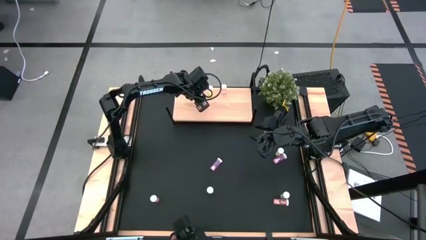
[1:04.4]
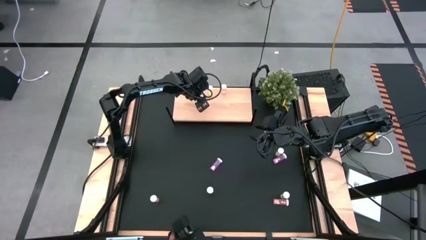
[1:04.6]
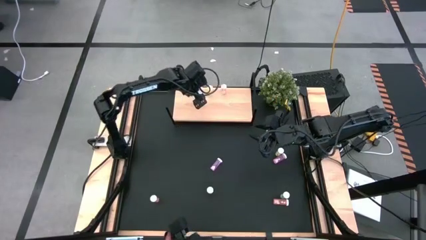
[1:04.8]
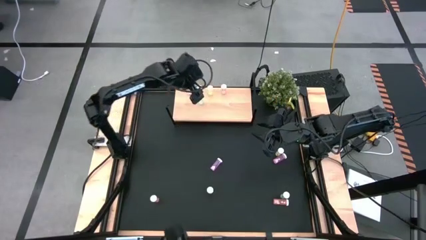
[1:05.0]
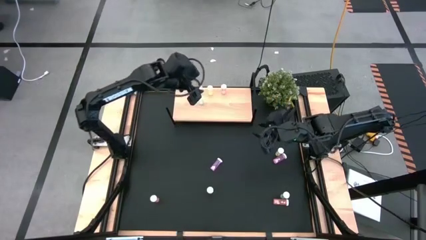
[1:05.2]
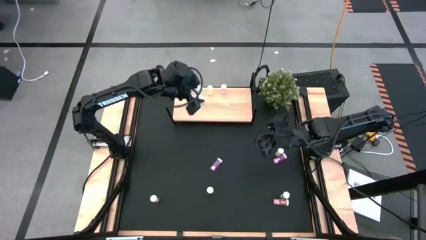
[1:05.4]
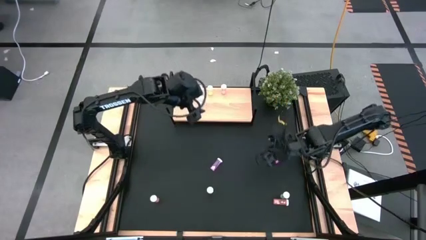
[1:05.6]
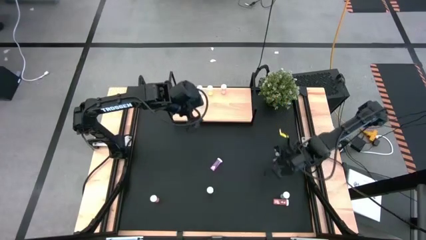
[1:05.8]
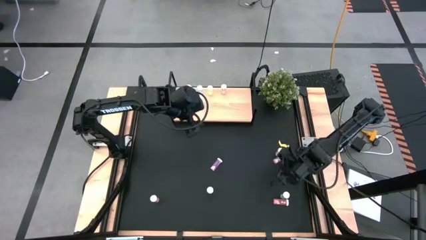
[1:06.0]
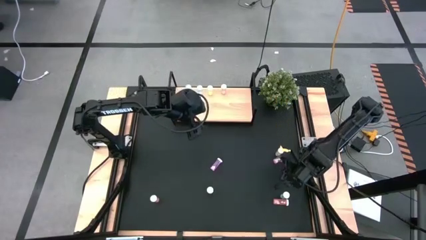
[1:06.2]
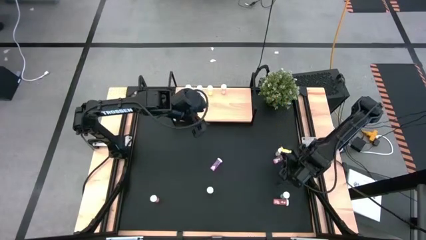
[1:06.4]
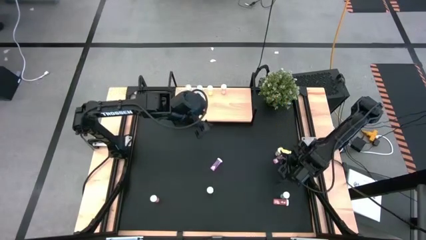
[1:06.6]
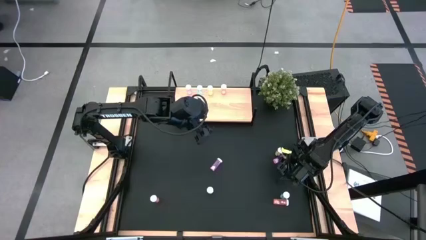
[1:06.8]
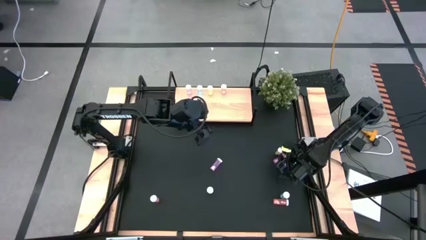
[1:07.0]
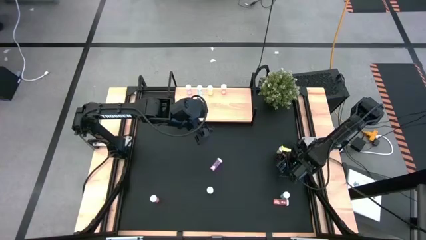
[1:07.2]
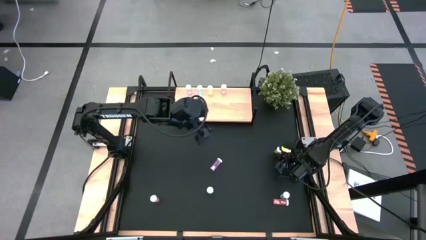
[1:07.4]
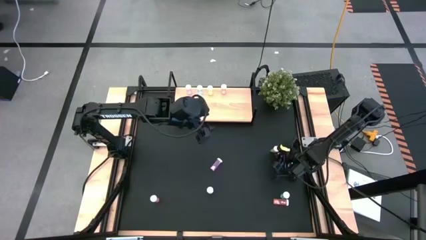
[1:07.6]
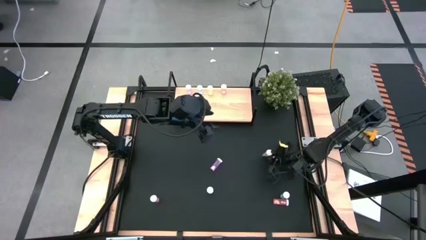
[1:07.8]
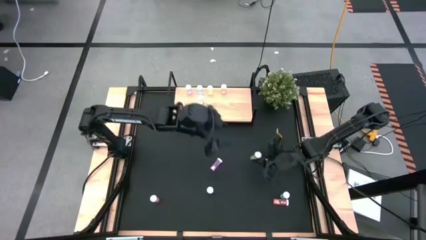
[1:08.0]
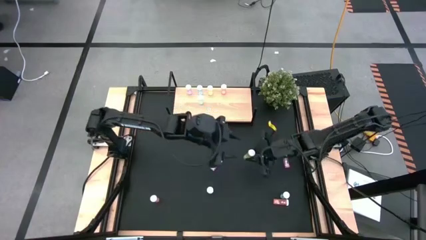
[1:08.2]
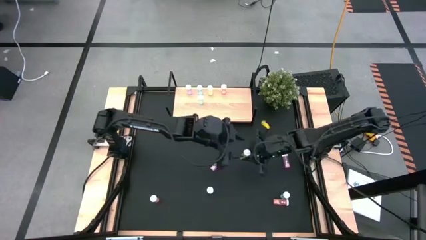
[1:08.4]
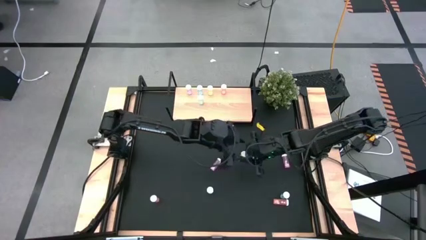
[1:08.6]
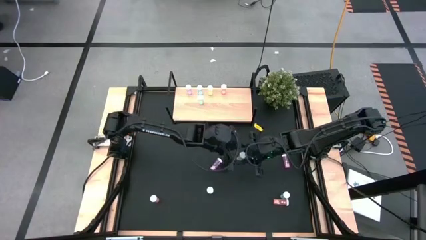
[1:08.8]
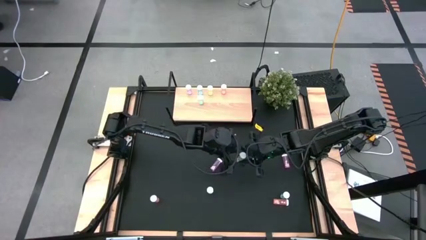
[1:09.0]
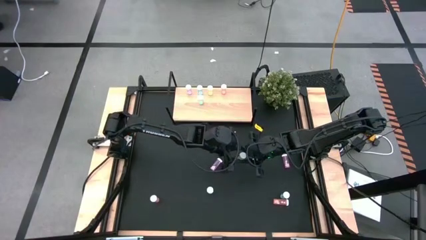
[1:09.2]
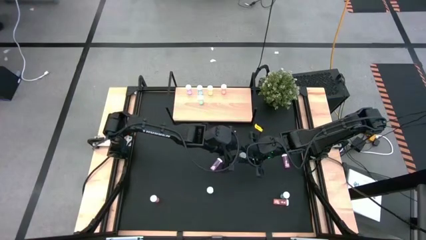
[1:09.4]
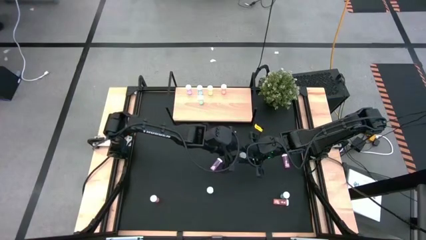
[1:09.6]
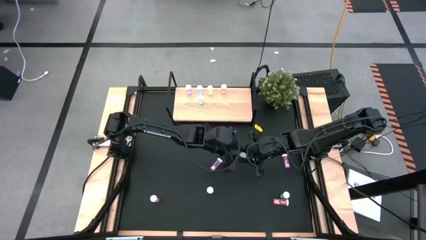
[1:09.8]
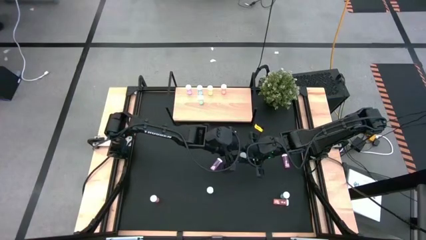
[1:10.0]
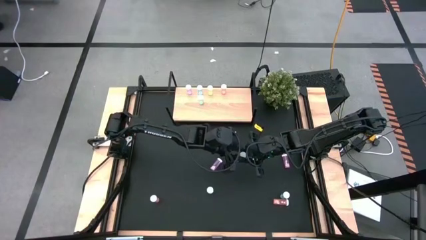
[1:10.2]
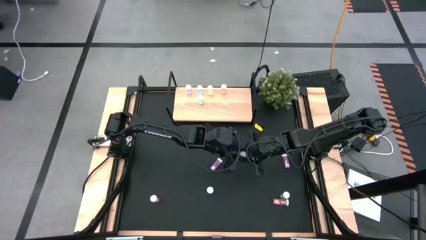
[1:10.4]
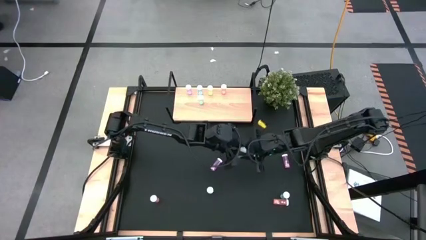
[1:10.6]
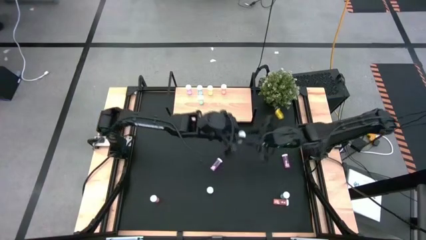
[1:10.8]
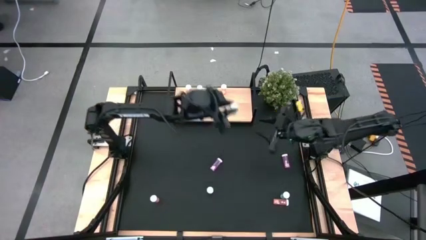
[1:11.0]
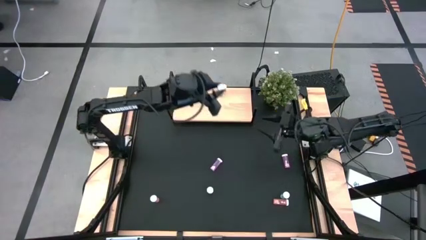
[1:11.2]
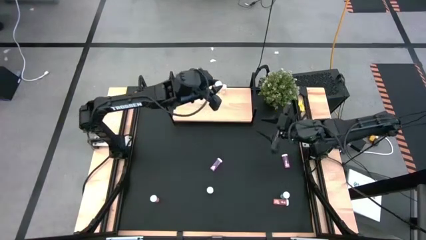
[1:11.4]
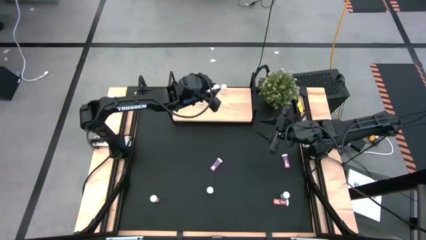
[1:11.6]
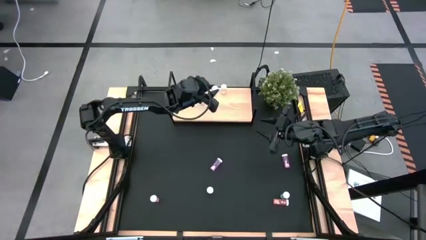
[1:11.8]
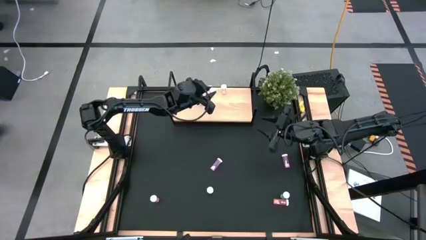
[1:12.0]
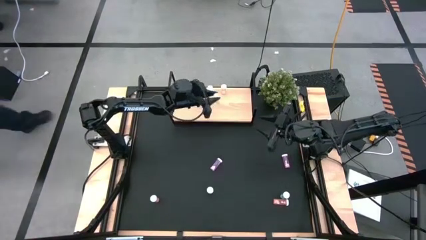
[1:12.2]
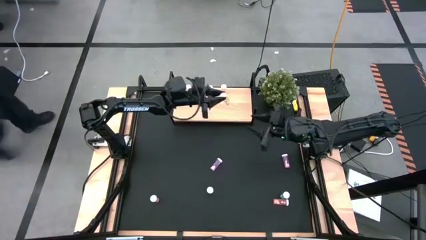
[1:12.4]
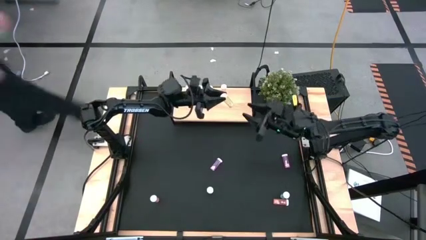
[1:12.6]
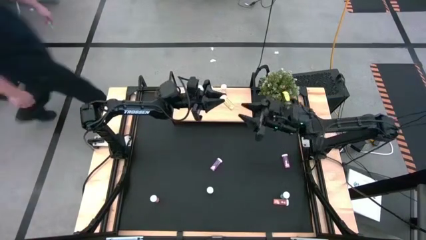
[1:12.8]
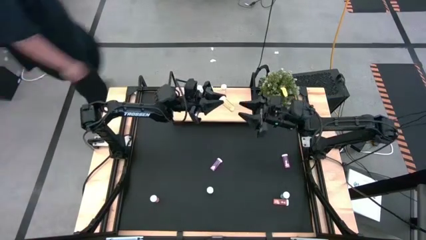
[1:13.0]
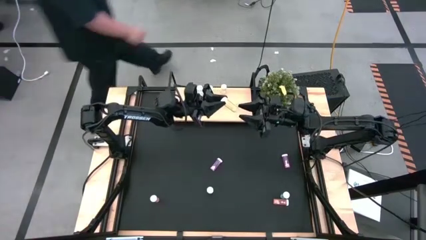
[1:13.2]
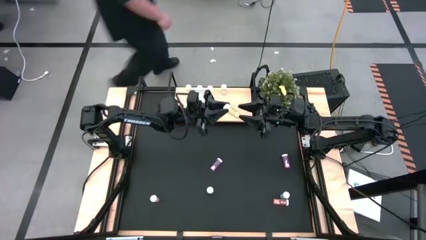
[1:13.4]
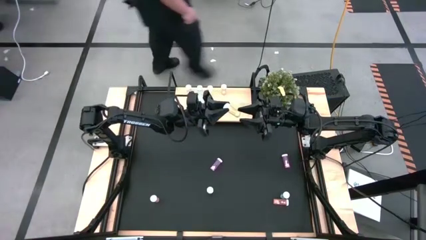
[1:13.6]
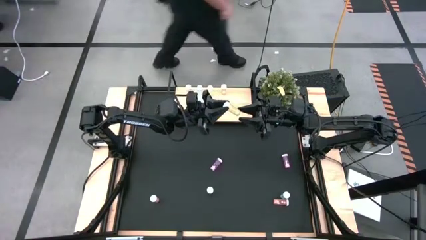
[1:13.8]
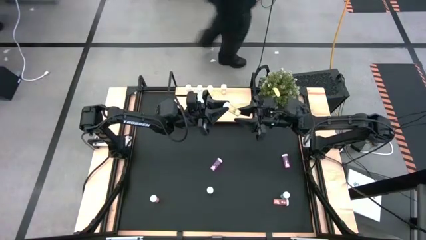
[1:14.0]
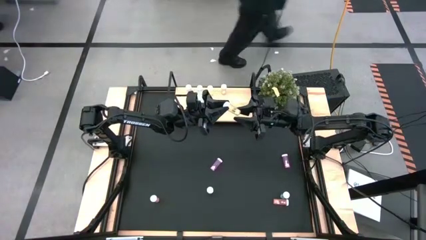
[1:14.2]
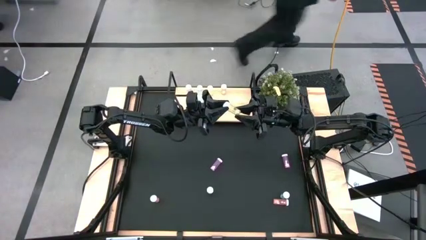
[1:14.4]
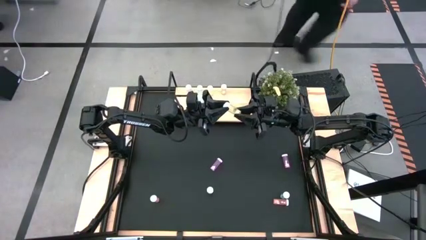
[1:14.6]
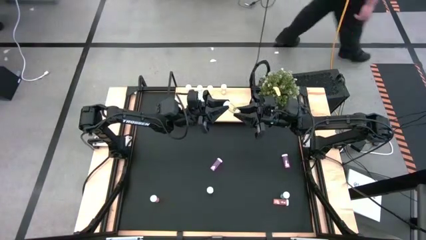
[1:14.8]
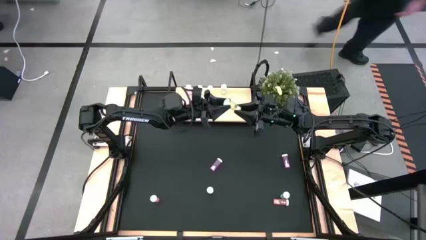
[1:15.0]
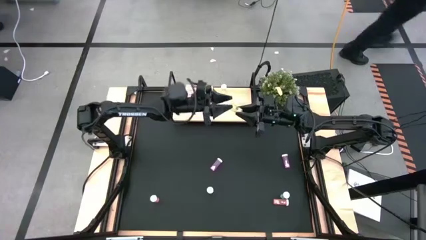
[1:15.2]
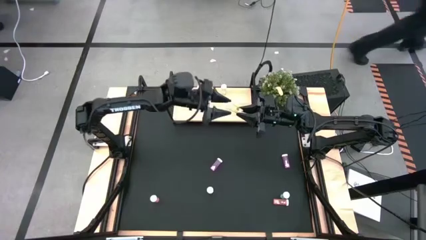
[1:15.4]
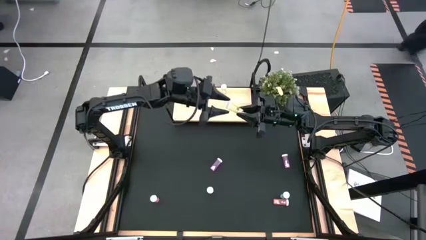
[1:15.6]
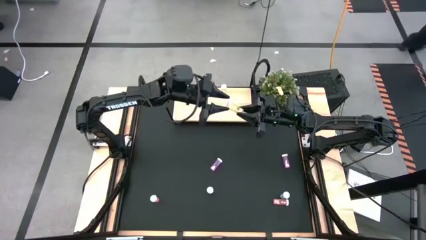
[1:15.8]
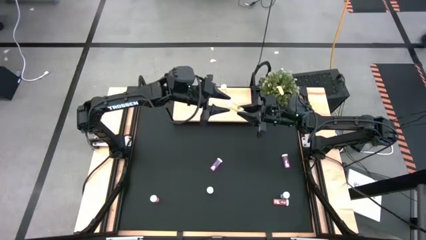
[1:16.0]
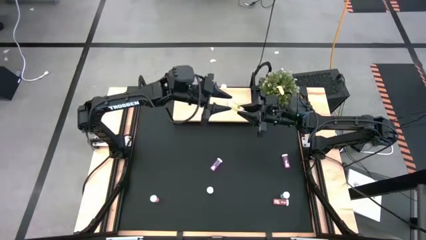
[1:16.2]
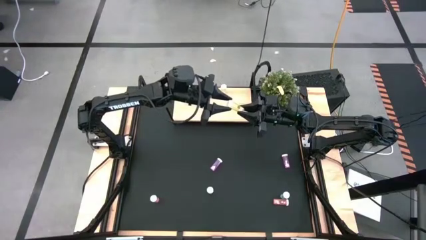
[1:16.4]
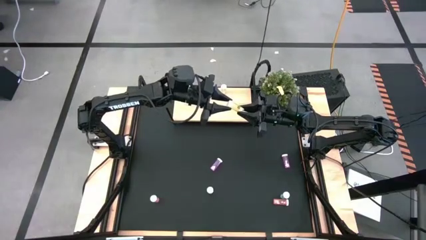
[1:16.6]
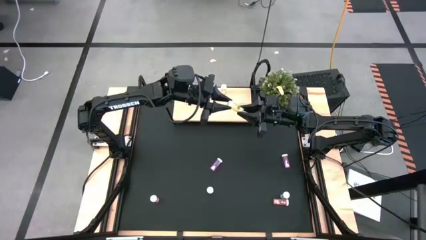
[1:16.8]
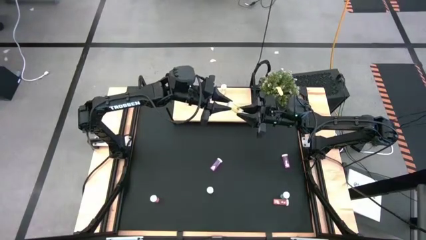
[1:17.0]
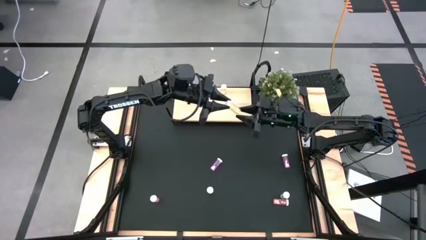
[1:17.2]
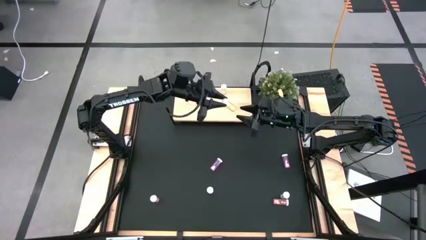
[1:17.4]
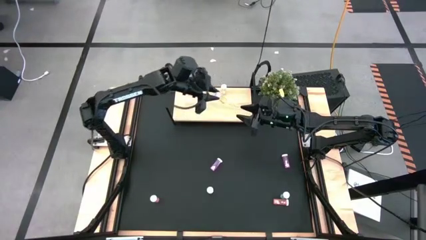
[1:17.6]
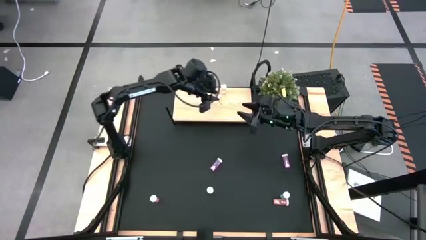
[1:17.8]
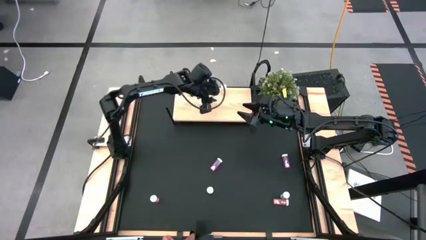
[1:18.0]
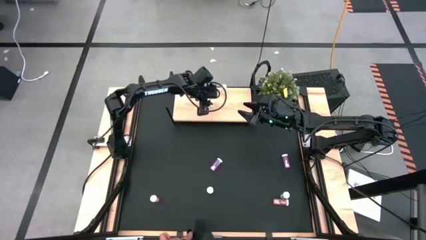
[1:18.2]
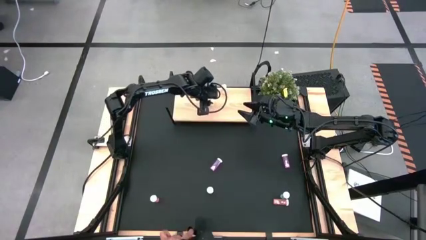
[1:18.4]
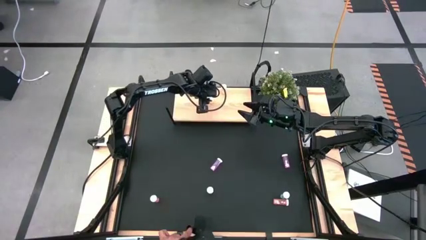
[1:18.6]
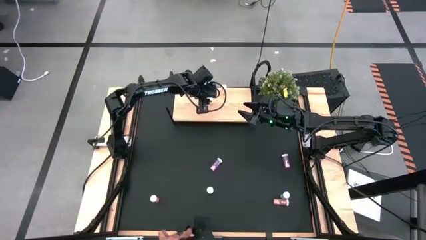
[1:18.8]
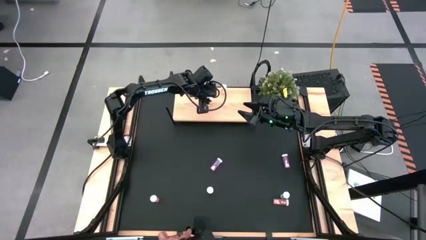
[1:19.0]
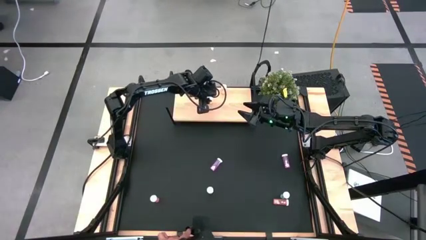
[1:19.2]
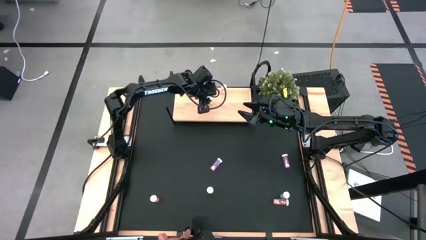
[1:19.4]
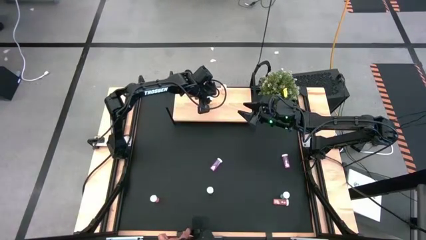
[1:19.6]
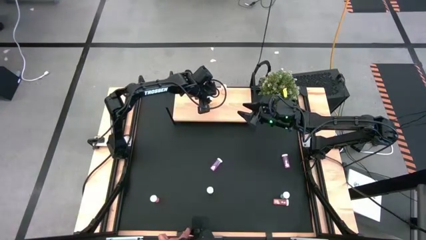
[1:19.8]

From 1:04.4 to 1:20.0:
Task: Pick and place medicine bottles onto shelf by color
Put the top yellow medicine bottle on the shelf aligned with the other yellow medicine bottle

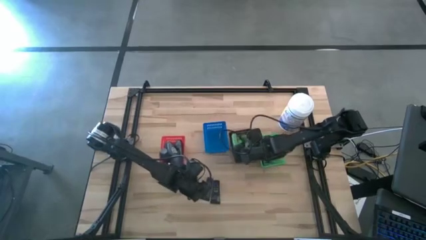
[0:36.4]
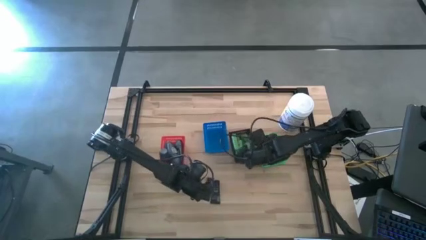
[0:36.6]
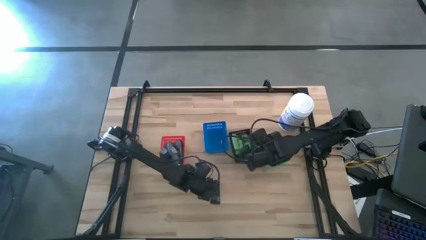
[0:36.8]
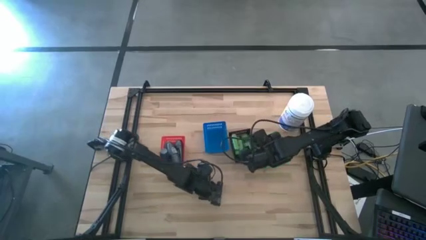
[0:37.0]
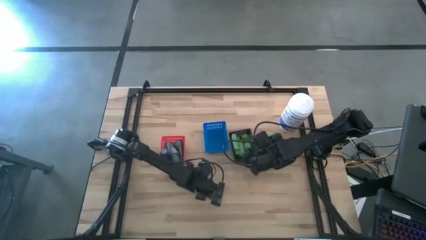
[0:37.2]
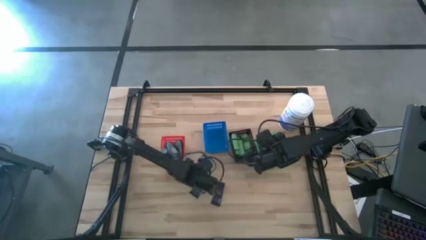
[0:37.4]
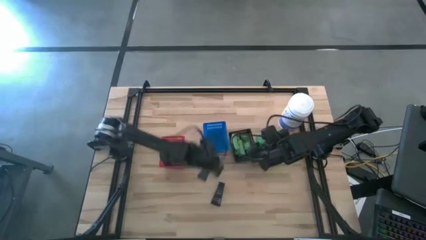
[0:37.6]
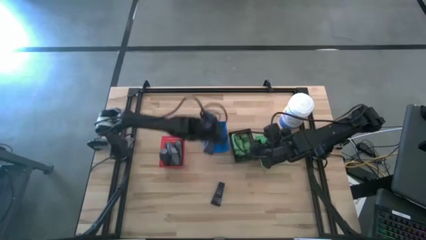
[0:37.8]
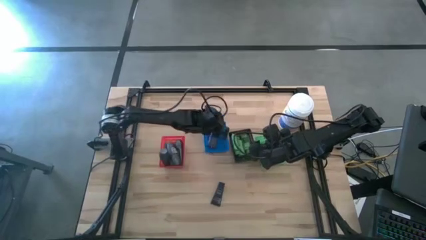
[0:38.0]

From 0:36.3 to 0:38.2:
Task: Pick & Place Travel size toiletries
Put the blue shaving cream into the blue bin

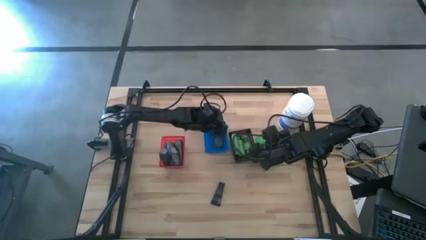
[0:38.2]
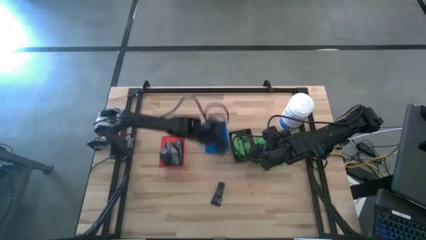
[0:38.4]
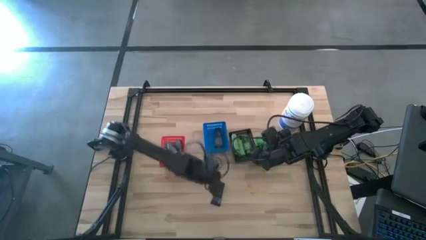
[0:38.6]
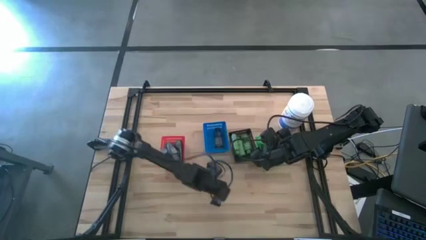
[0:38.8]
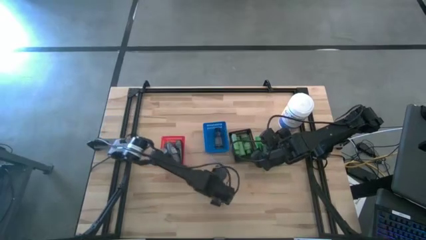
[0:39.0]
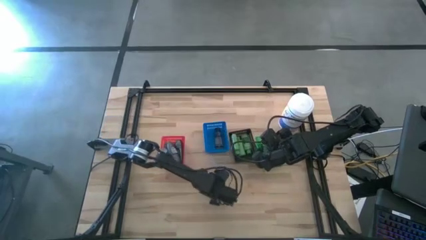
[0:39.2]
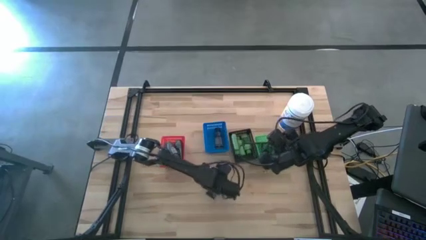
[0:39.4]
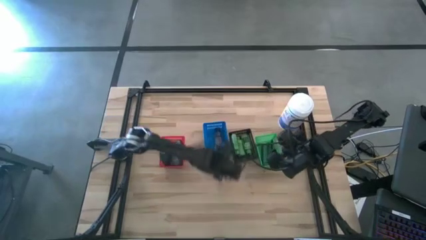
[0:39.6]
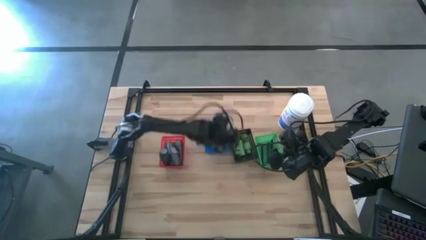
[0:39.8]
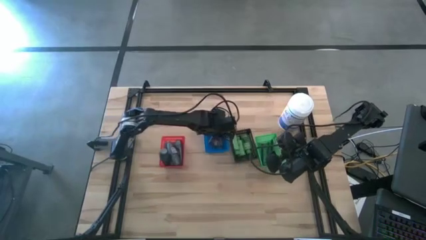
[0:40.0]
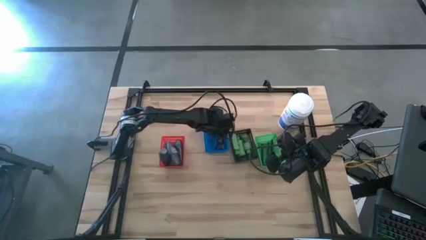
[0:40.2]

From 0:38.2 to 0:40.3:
Put the blue shaving cream into the blue bin
